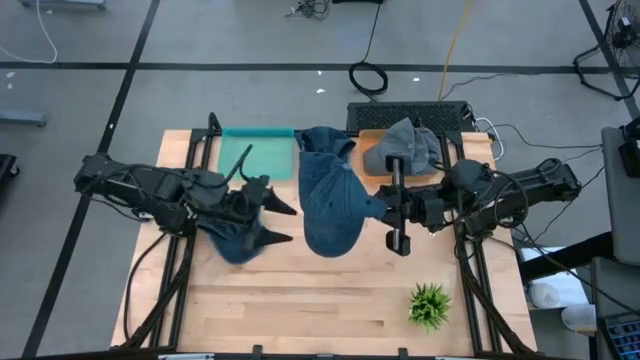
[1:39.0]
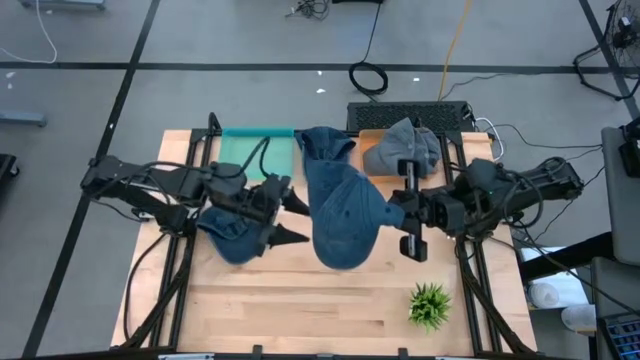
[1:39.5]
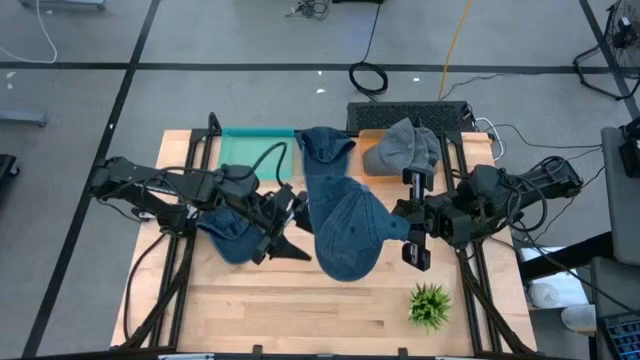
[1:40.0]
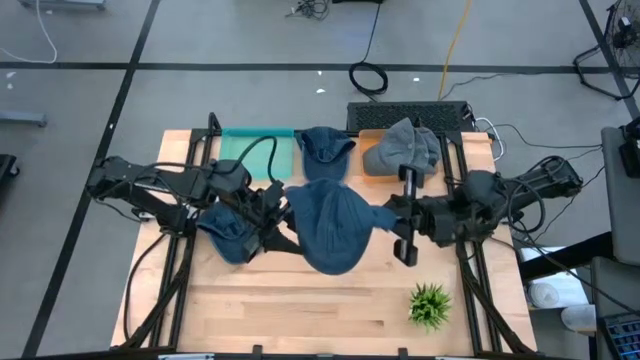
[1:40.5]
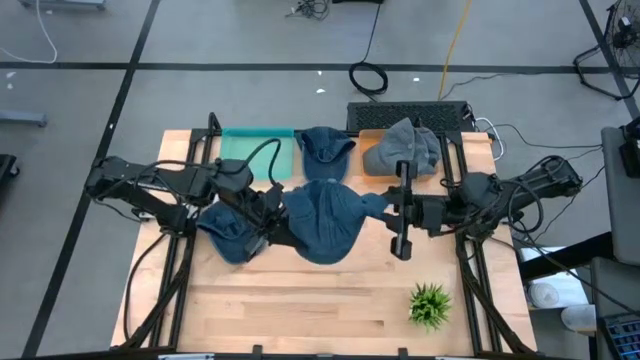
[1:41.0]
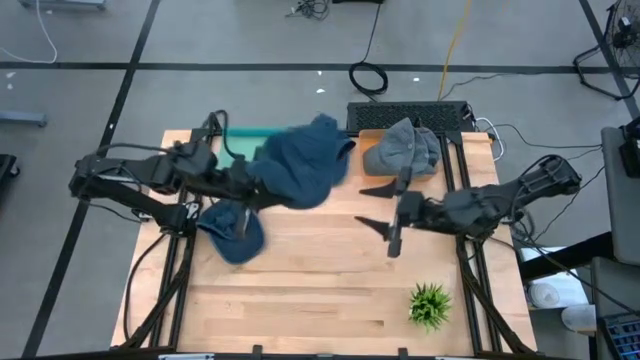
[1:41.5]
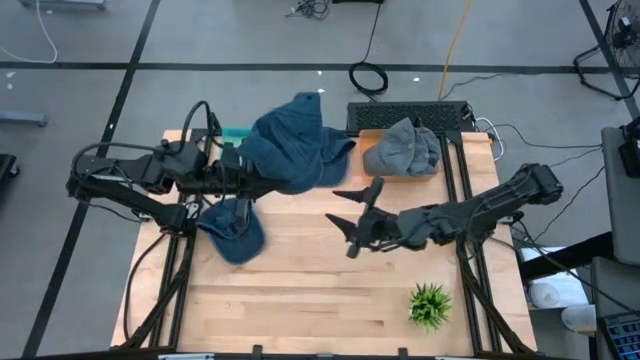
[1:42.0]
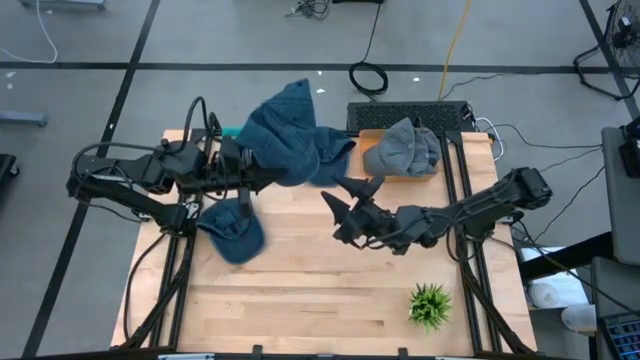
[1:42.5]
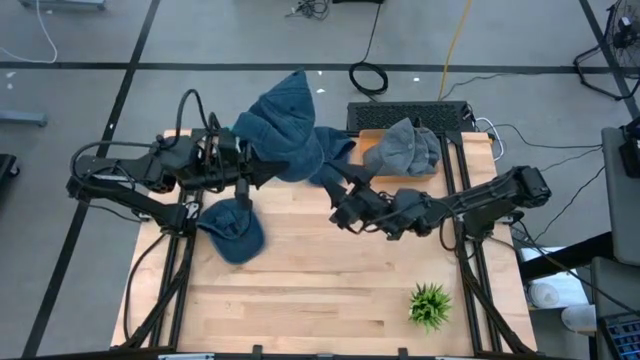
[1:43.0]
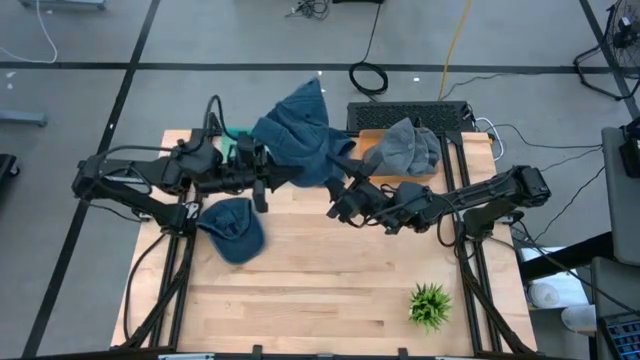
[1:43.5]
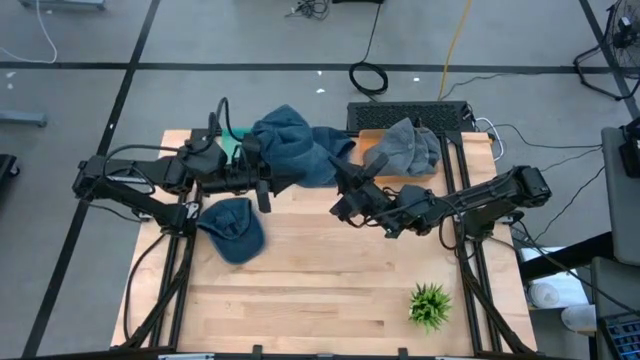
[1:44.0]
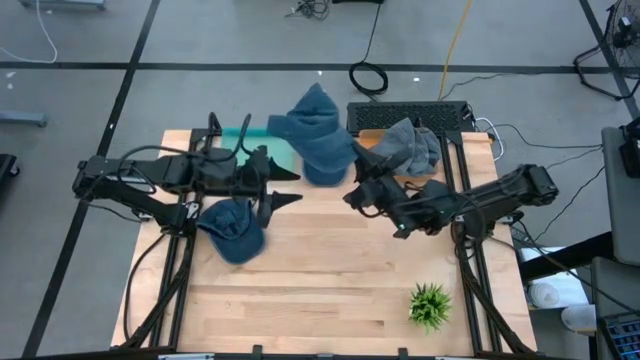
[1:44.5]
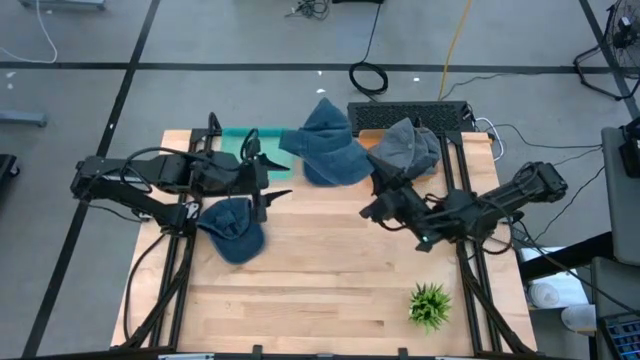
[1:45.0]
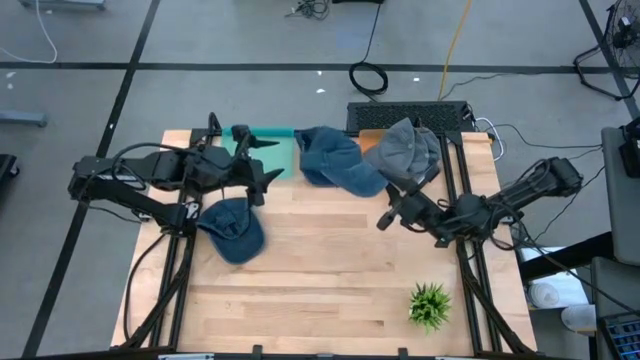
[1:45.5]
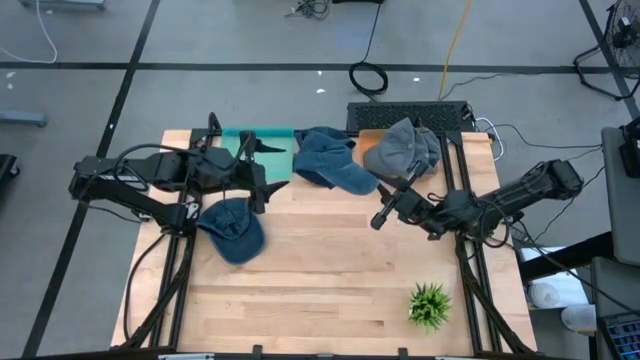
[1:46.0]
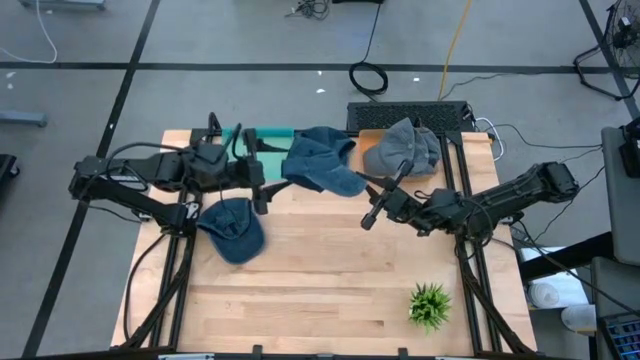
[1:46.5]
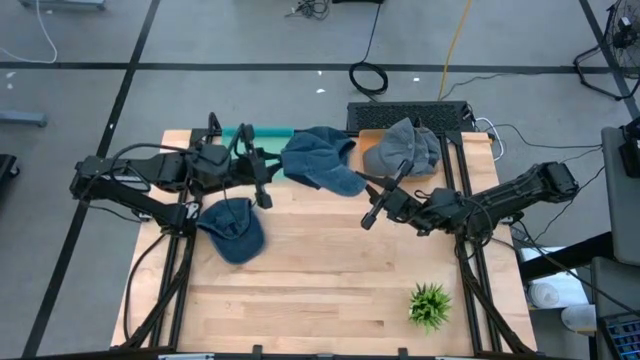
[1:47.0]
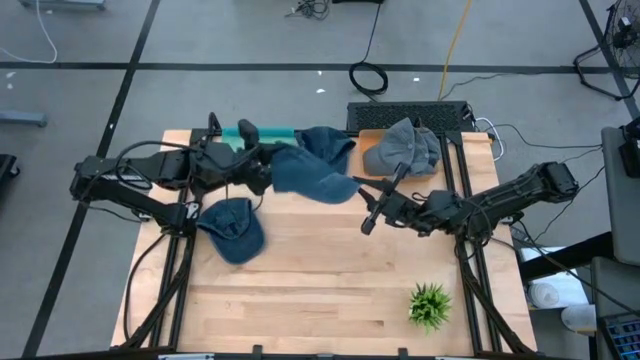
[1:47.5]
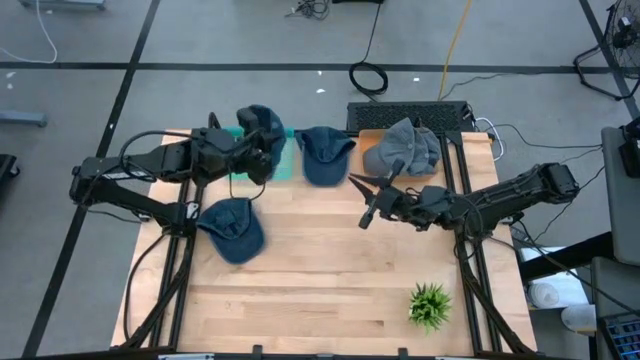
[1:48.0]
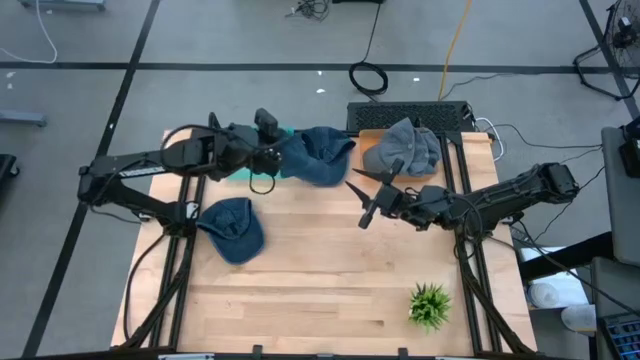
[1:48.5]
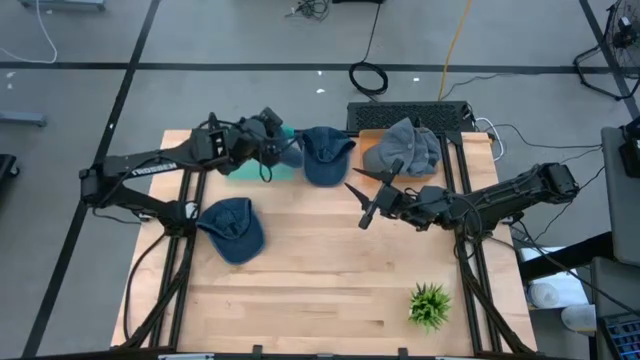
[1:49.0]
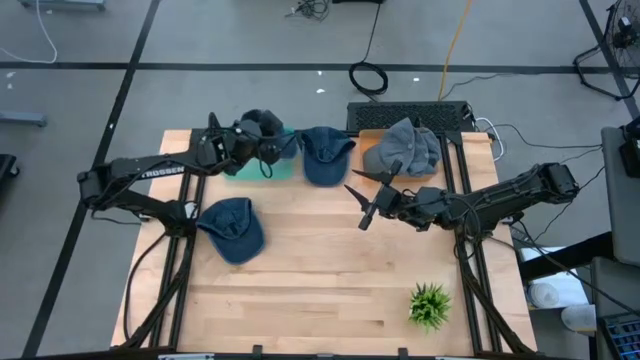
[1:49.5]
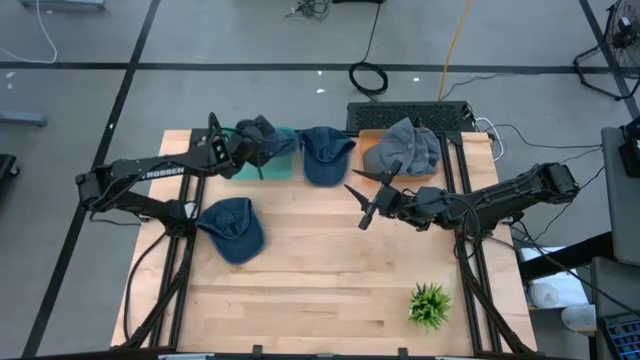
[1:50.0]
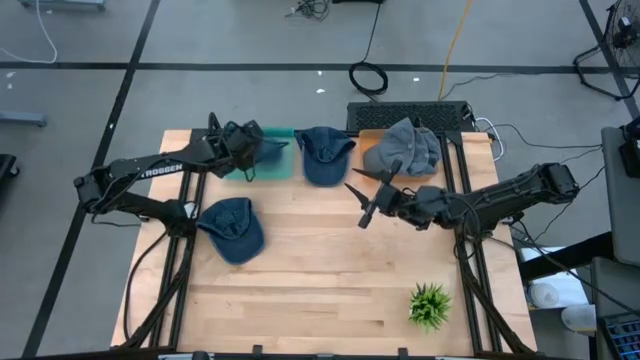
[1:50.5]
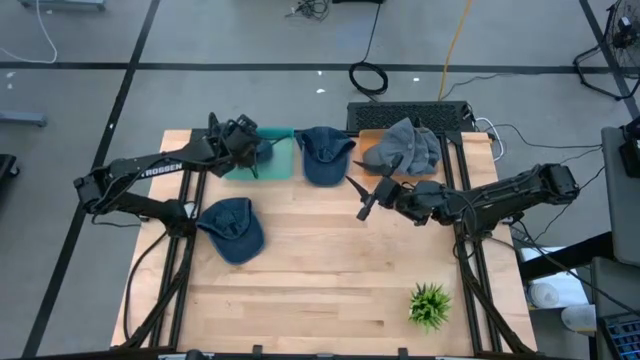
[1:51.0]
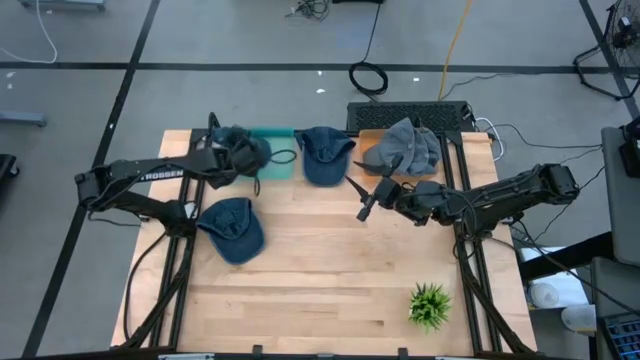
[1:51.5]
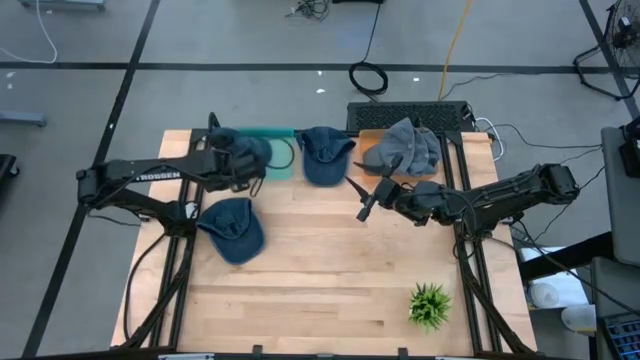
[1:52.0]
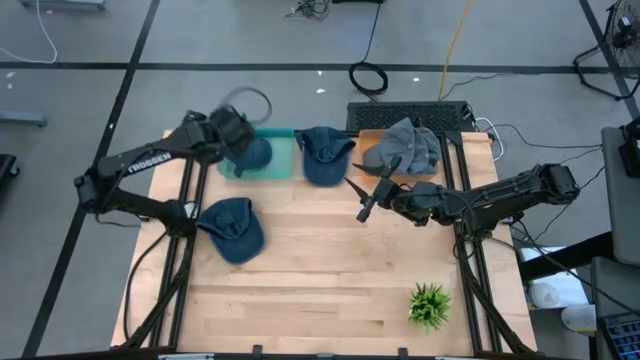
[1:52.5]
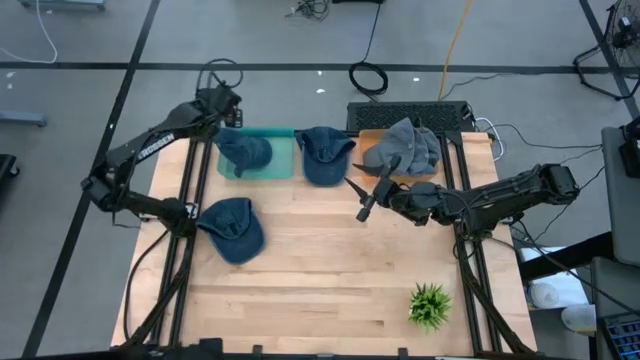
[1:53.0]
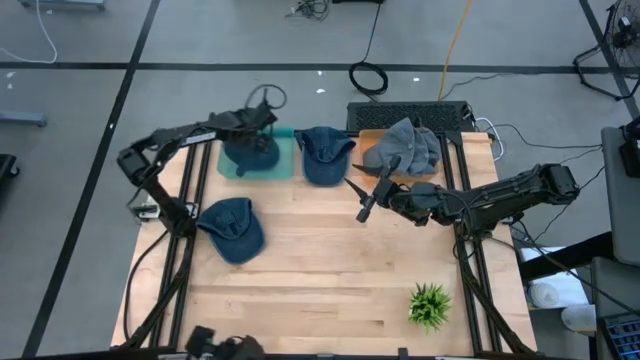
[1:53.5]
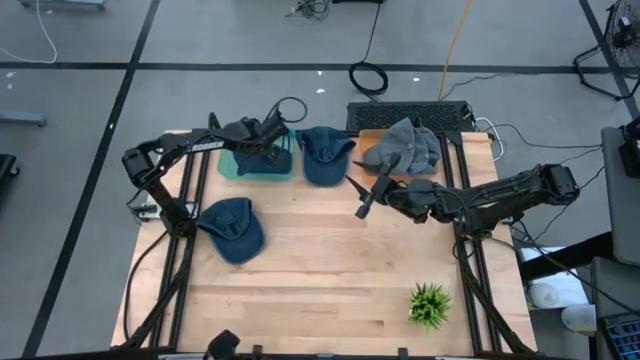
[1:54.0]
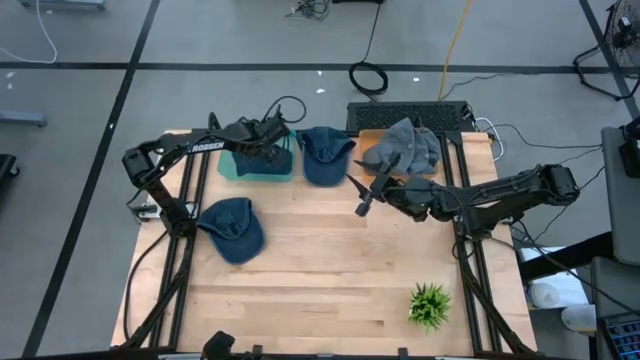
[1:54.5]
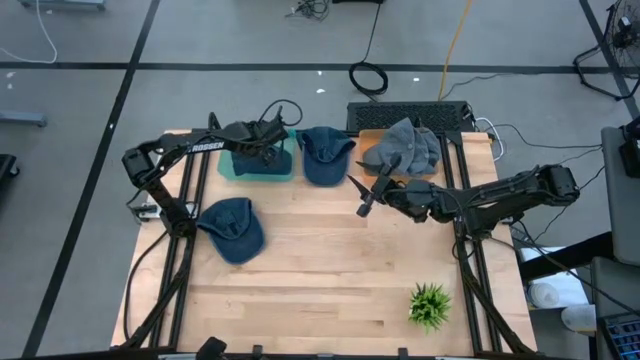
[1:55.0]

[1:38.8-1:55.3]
Task: Pick & Place hat
Put the right dark blue cap into the blue bin

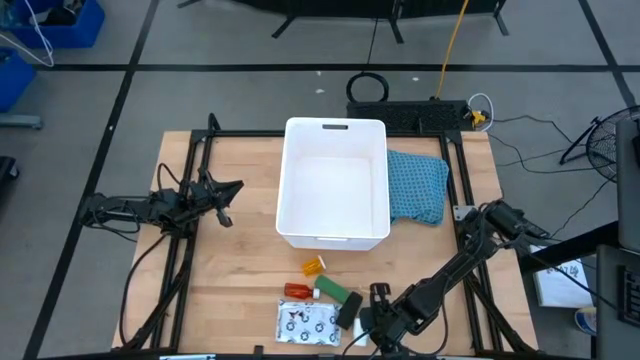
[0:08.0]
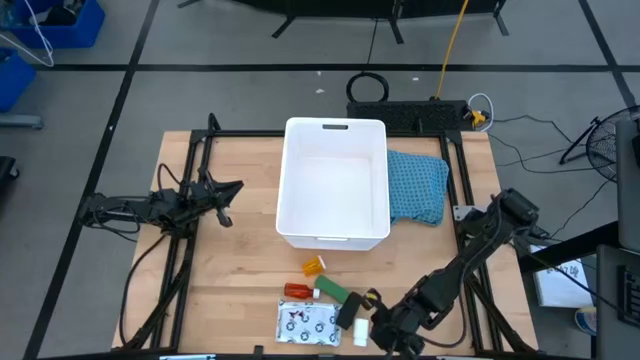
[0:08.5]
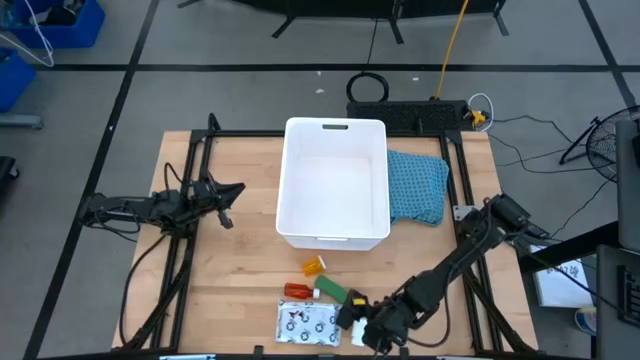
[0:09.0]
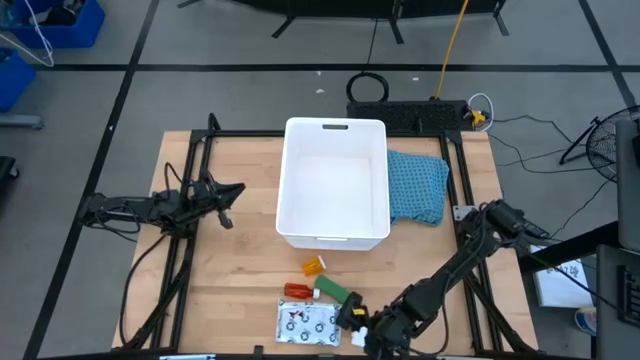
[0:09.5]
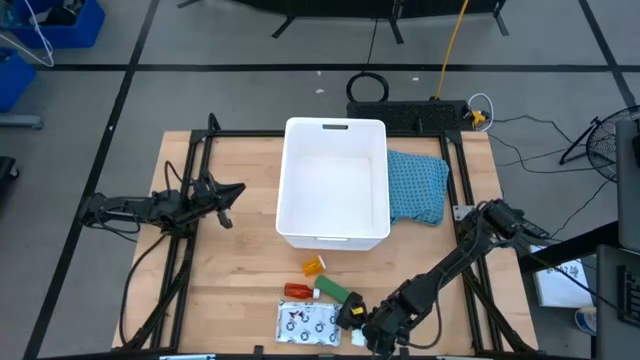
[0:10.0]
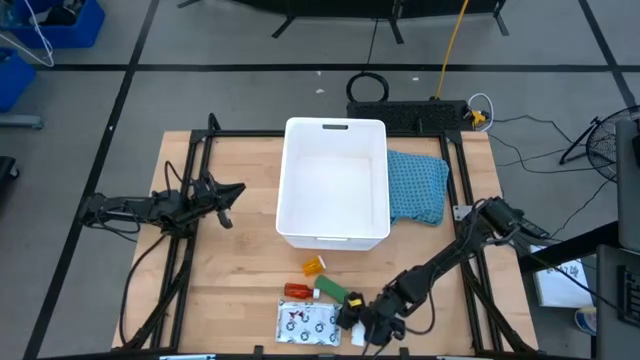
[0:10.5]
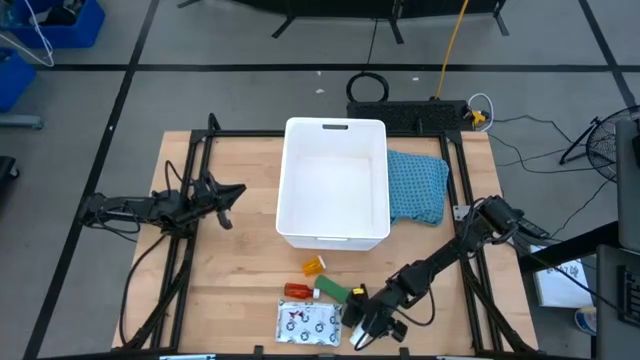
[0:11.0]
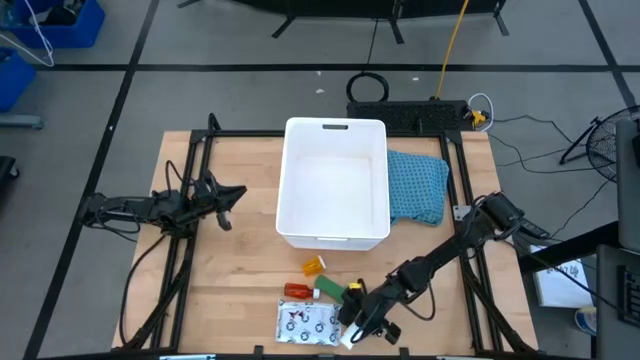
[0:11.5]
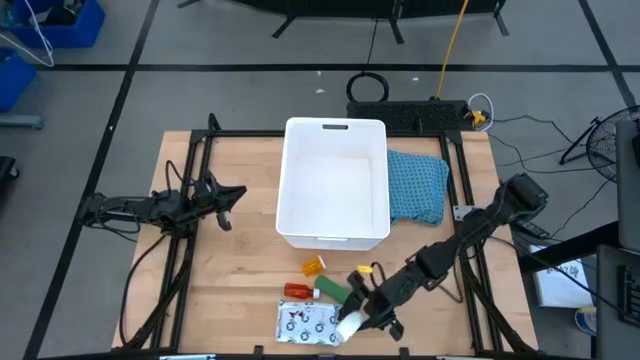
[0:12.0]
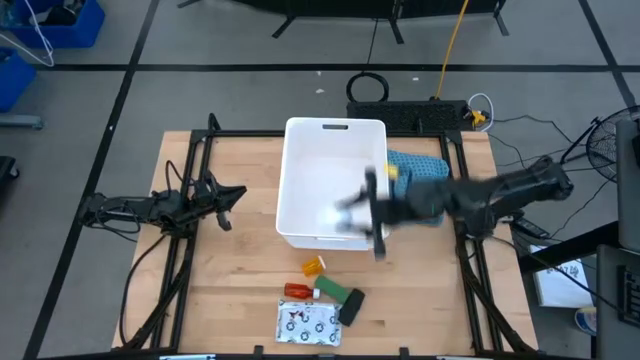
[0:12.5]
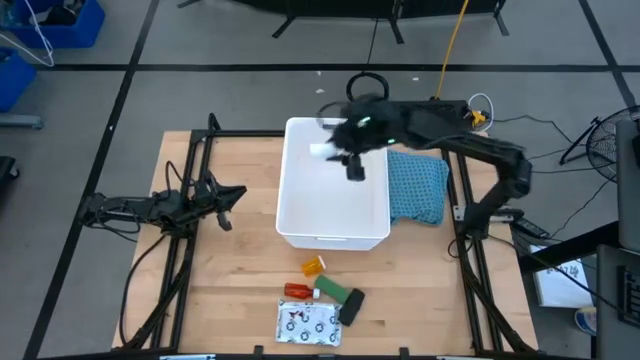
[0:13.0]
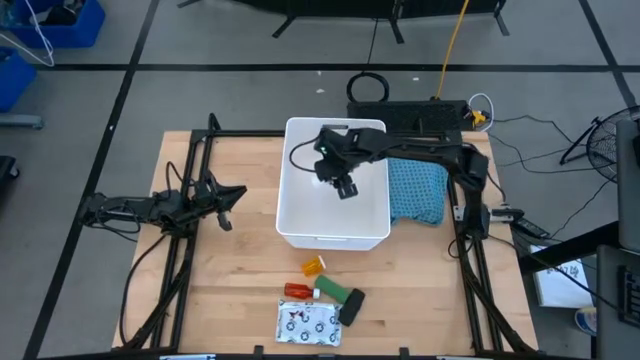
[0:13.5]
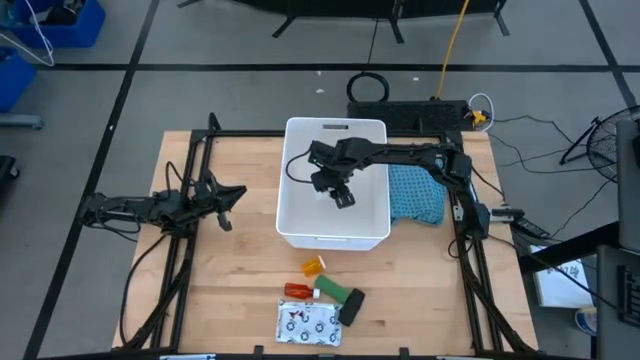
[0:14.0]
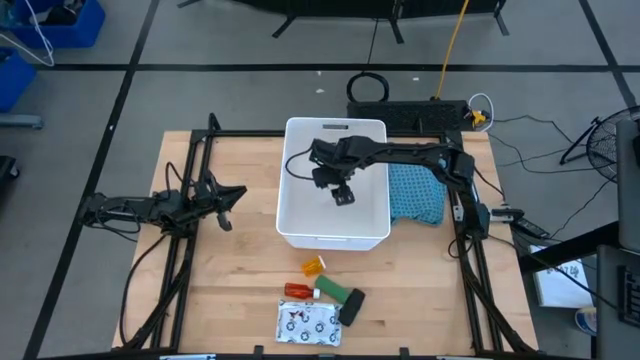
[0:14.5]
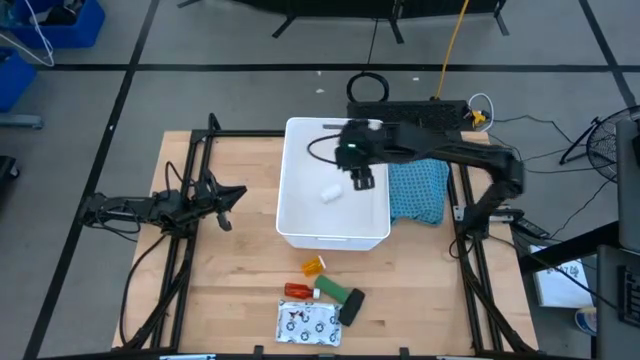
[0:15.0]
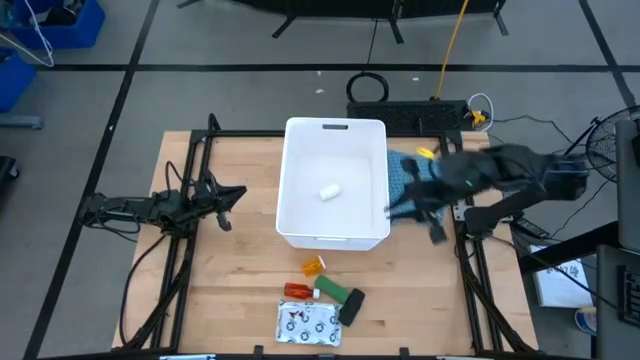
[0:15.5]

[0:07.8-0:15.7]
Task: Pick & place medical supplies in basket/bin
Put the white pill bottle into the white bin
